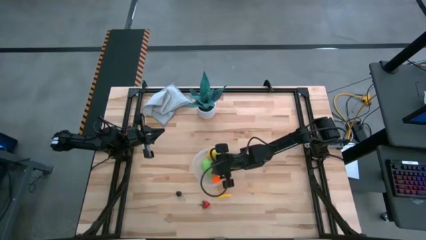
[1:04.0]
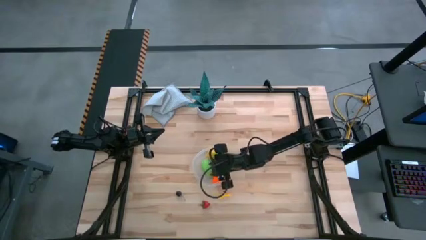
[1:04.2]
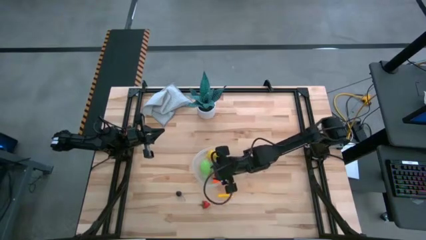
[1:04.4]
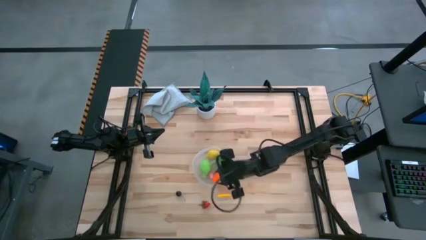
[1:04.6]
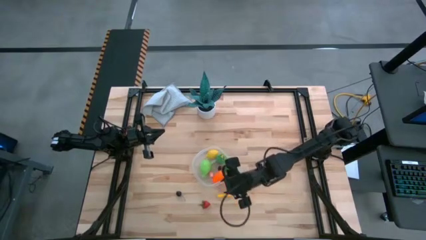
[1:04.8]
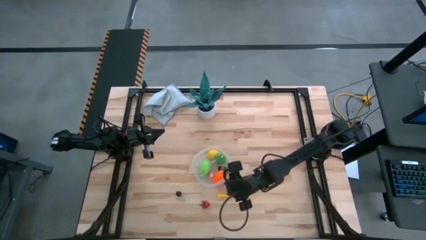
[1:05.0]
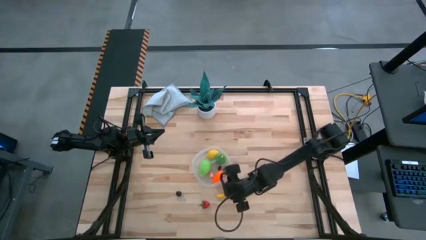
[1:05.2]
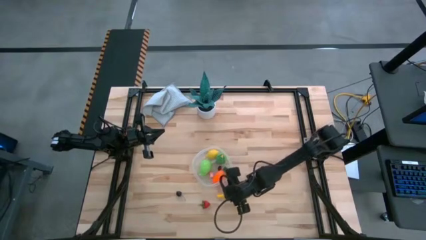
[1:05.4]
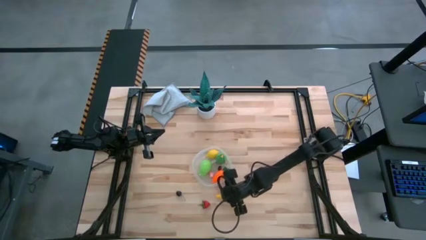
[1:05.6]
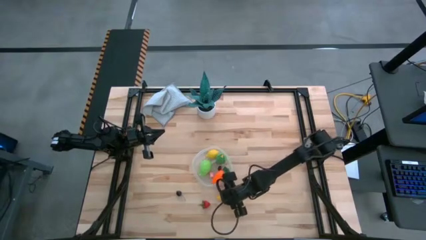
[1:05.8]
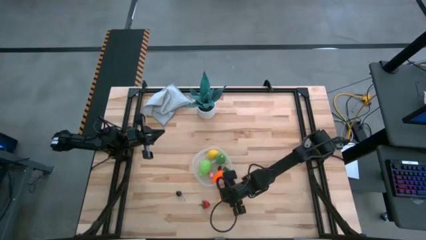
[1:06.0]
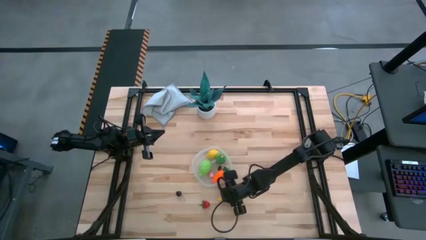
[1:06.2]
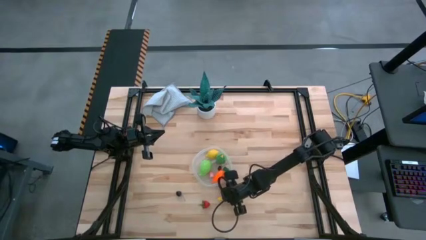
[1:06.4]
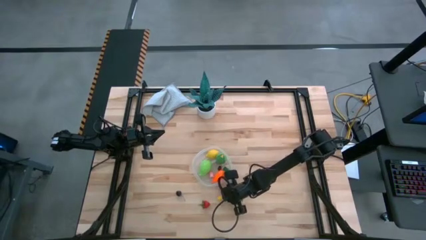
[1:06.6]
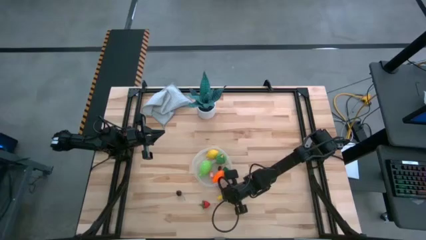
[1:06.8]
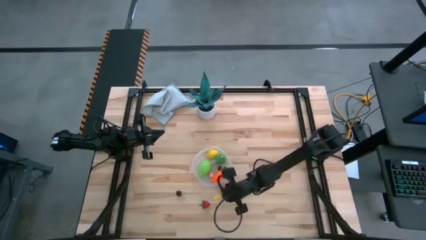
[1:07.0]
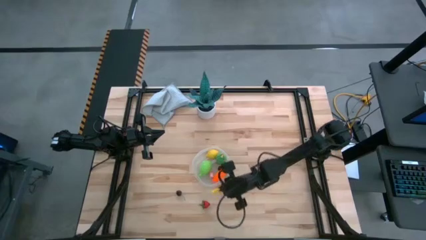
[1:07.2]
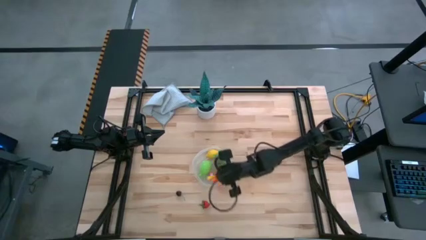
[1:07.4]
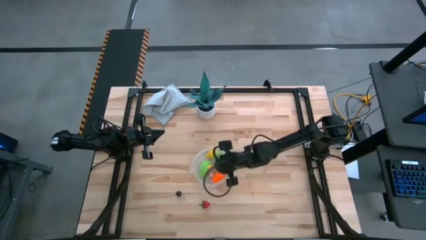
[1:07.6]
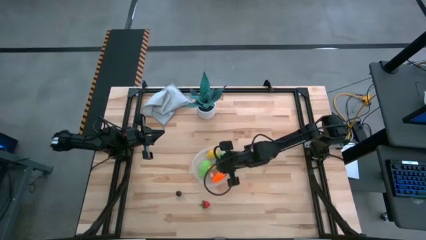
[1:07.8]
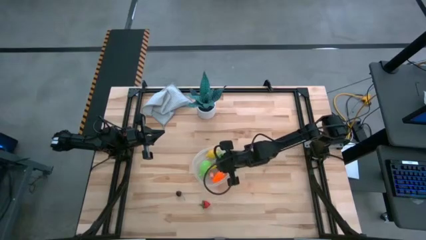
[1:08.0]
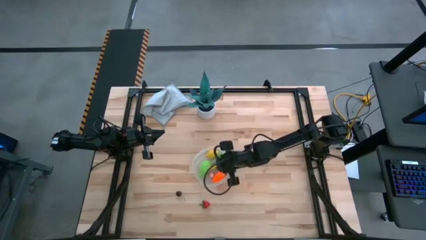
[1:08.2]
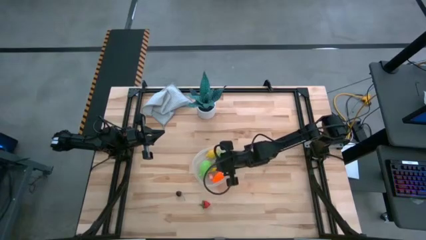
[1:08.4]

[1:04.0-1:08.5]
Task: Pick and placing Produce into tupperware
Put the squash into the bin

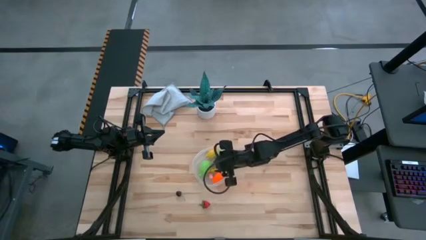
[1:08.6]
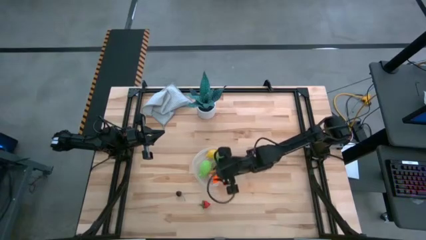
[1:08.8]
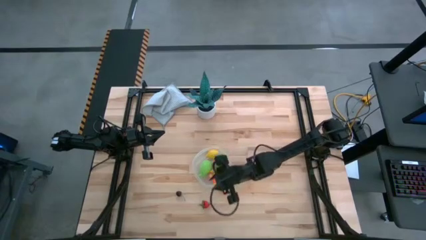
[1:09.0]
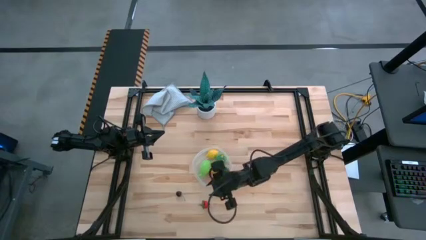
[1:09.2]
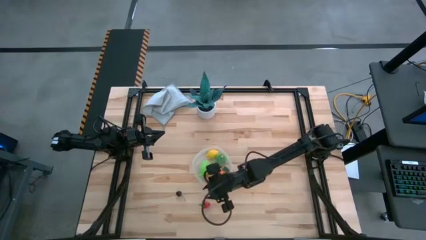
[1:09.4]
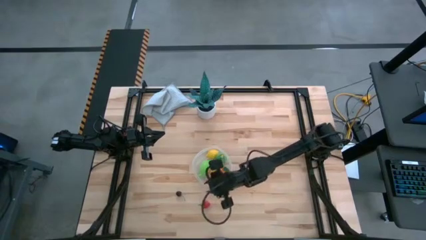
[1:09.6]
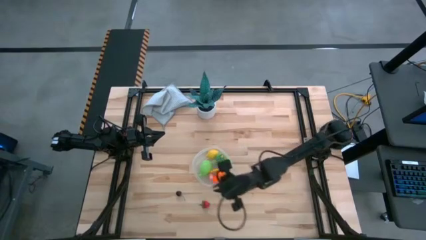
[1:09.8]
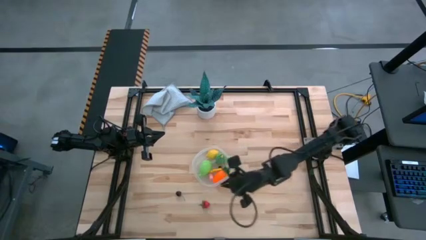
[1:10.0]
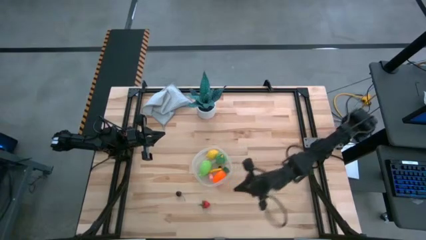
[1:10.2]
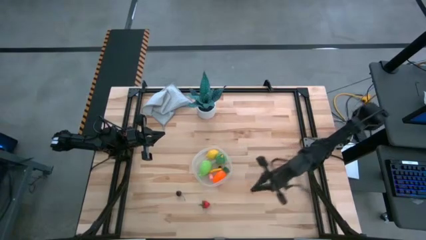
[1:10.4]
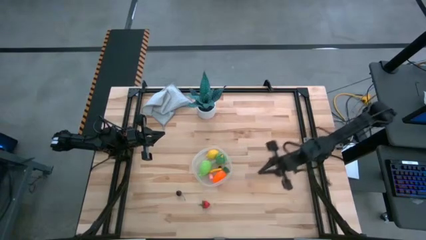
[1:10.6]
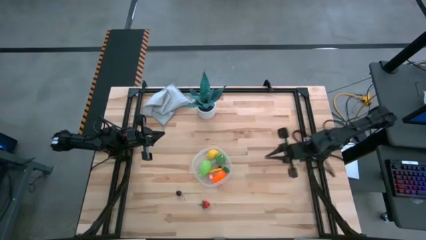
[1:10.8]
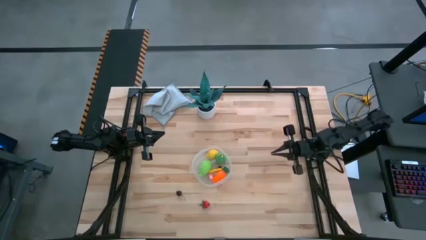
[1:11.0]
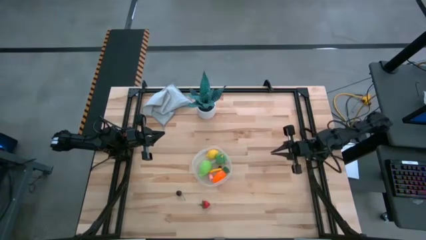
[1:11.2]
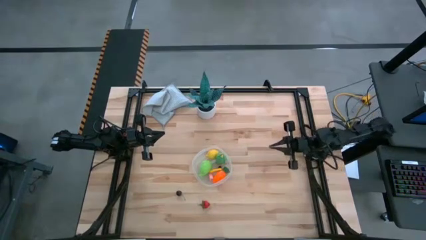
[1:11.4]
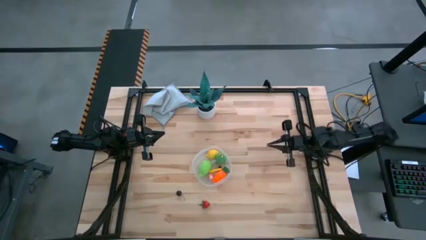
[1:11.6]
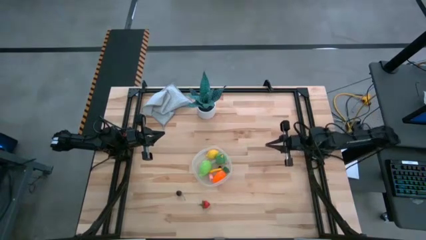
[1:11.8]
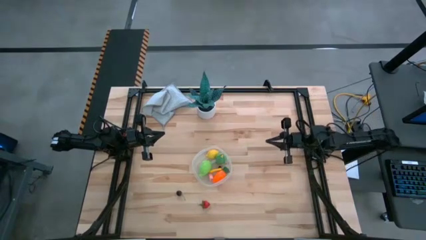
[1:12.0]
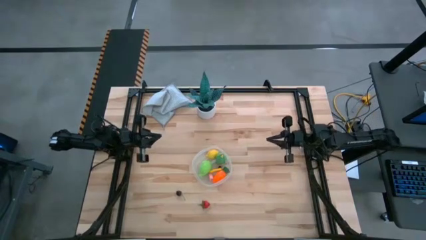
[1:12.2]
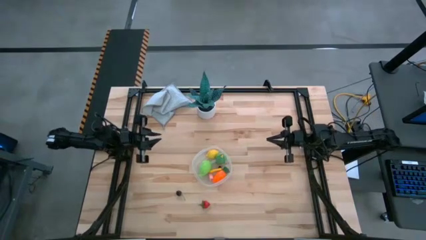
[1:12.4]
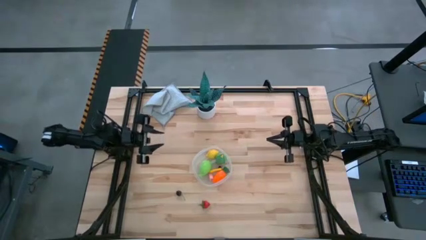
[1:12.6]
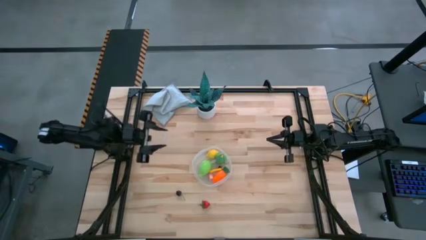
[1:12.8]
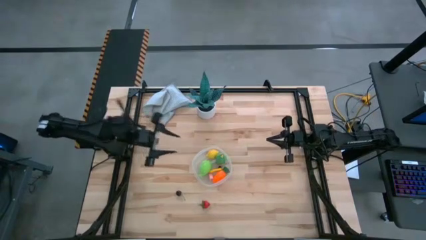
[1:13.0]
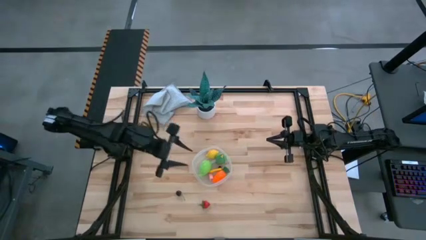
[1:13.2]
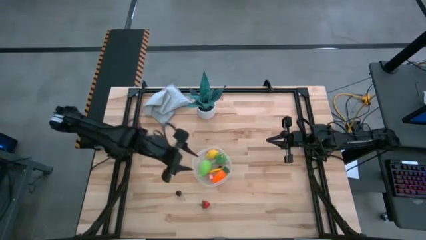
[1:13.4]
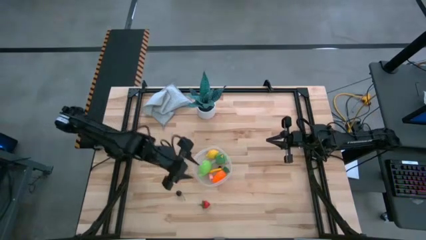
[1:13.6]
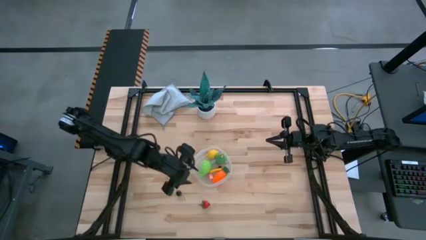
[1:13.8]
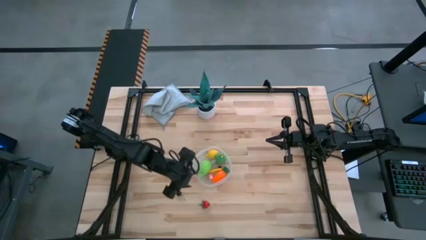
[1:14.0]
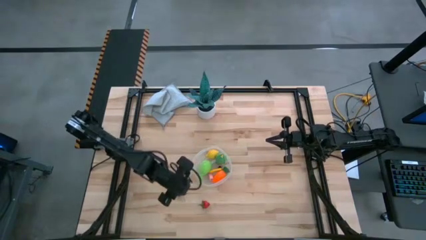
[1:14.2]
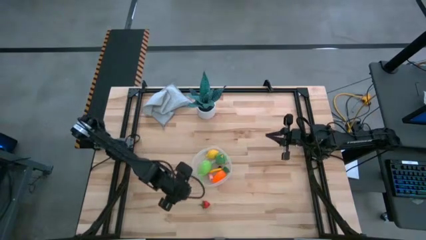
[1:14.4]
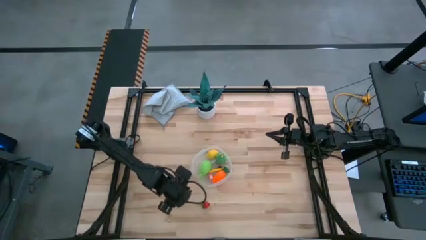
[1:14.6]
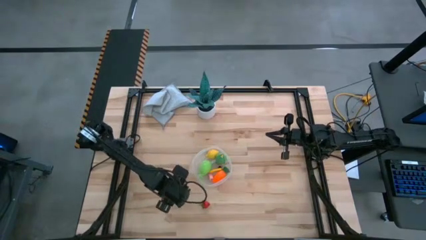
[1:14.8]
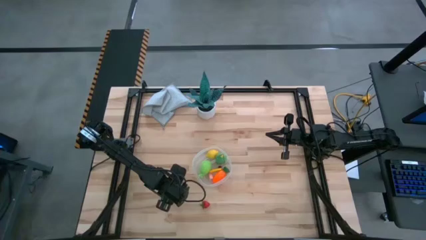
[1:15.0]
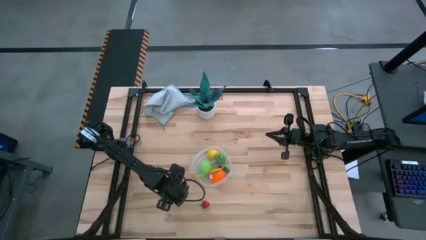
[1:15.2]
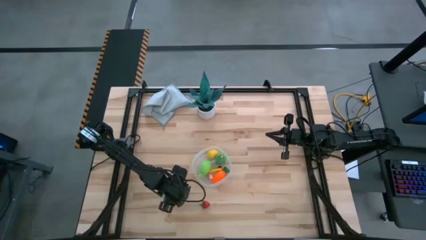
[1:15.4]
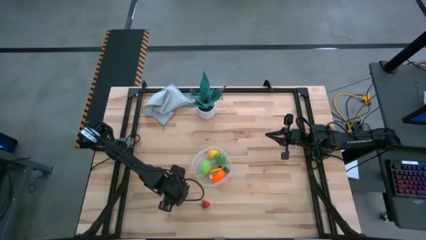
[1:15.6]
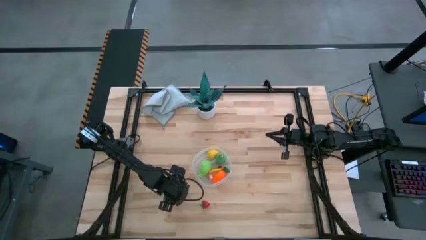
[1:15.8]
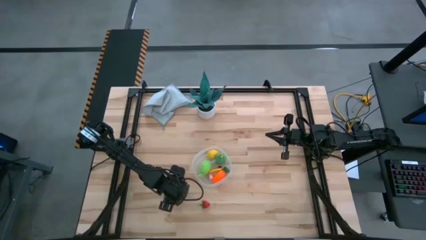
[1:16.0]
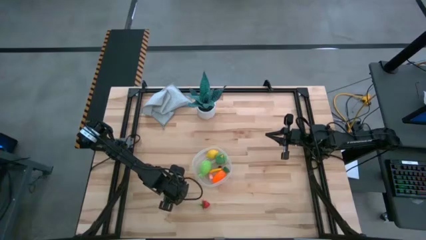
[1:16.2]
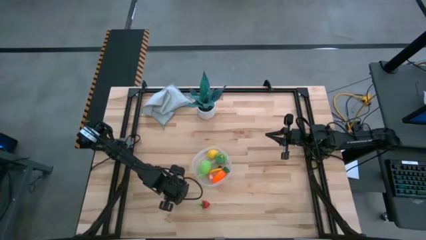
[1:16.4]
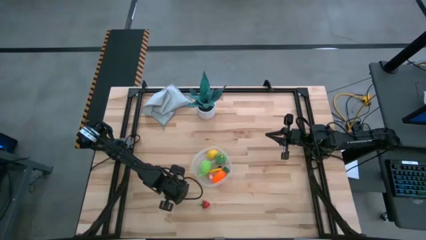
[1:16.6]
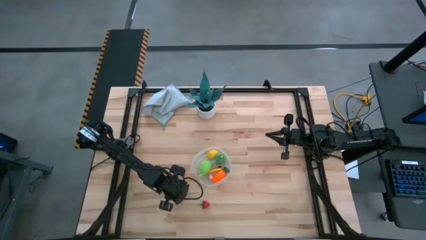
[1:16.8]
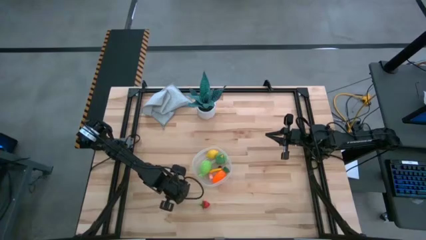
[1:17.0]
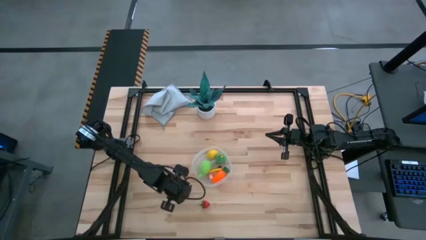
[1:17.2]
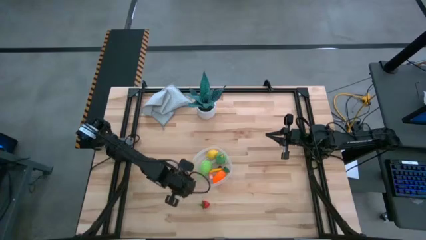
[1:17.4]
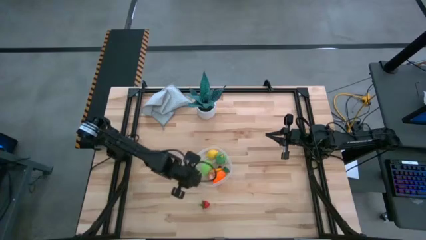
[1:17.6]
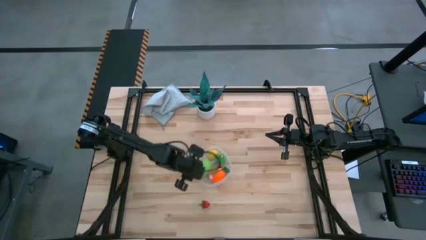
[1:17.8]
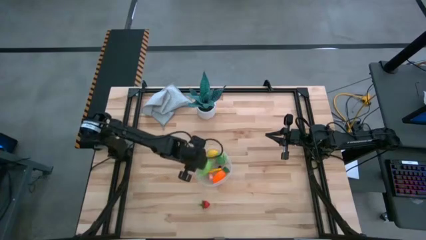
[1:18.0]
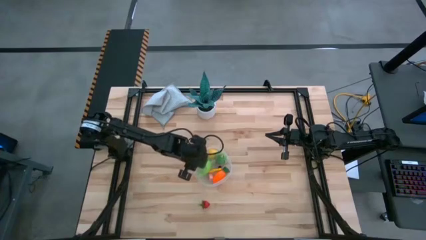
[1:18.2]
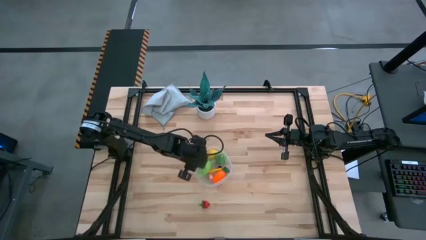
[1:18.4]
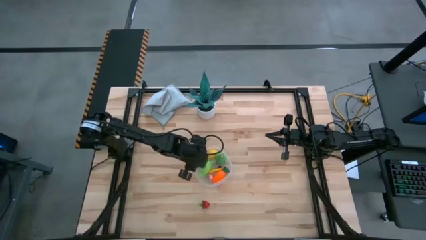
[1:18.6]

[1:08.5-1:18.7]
Put the black cherry into the bin

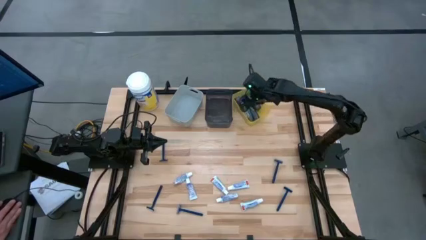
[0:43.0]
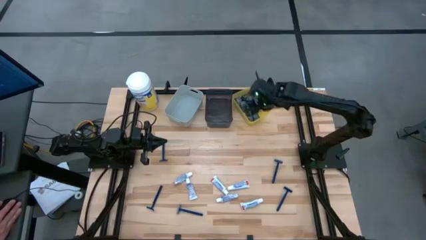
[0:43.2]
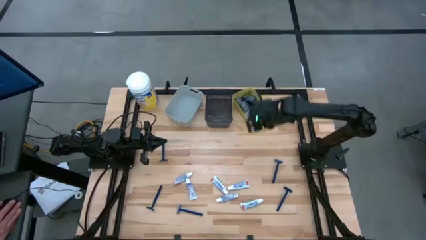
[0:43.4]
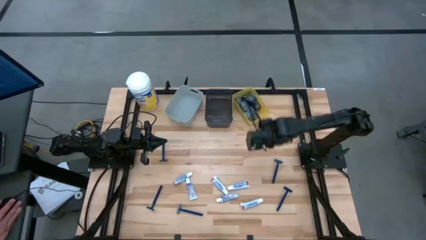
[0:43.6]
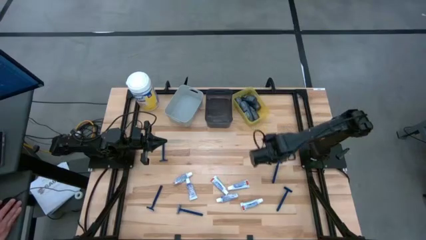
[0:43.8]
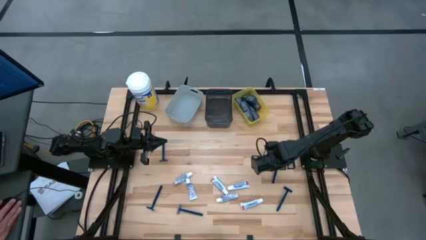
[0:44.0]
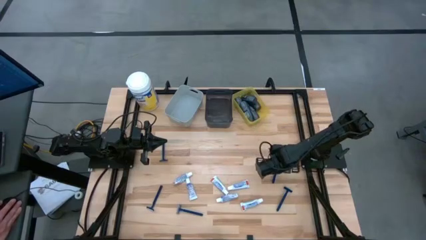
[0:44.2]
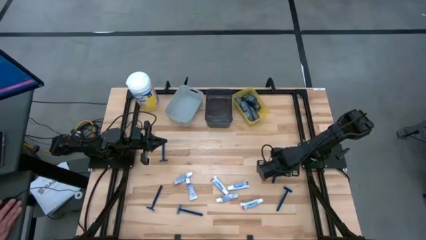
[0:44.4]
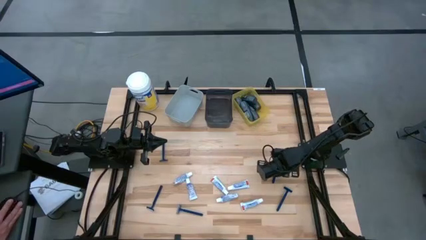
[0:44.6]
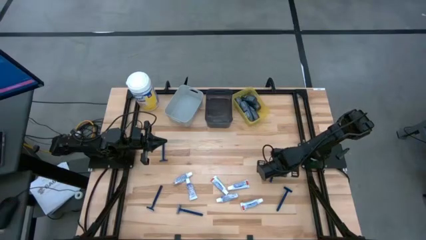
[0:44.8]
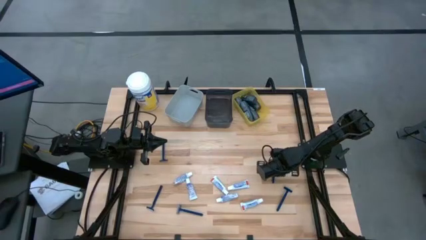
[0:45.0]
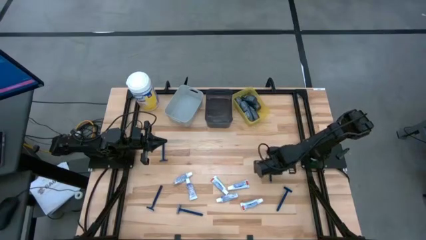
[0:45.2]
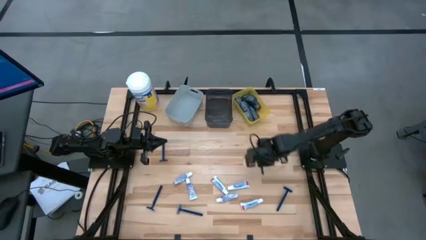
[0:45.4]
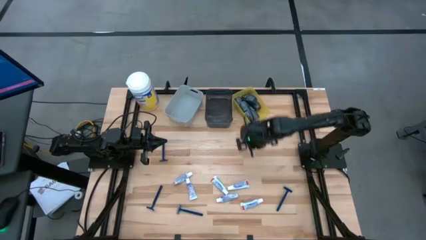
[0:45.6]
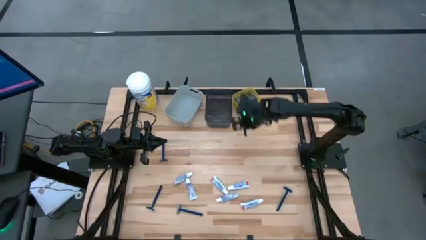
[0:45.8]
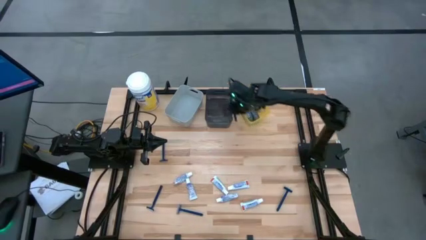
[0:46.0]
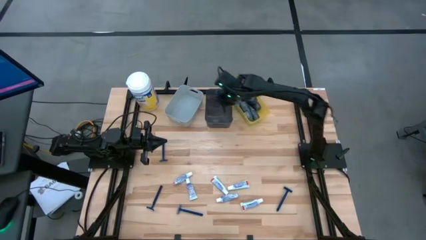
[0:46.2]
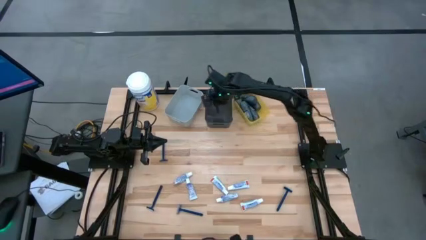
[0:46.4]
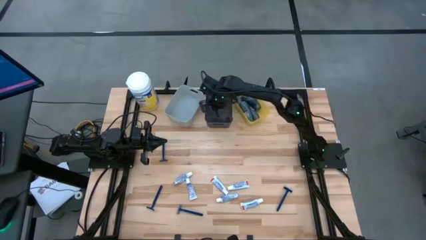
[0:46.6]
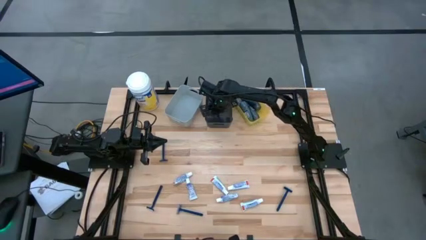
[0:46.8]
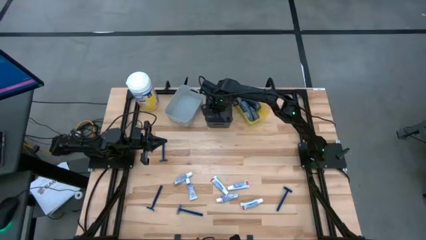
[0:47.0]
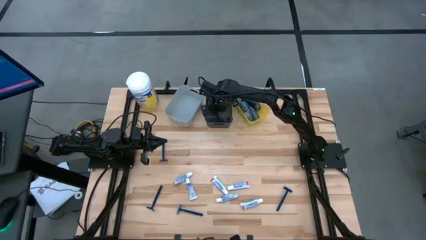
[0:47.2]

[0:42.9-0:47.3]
Task: Pick & Place Travel size toiletries
Put the razor into the black bin
